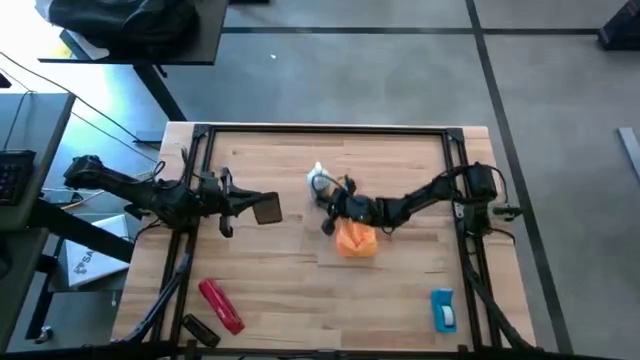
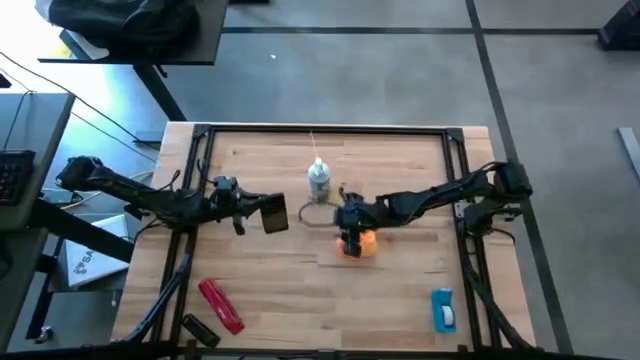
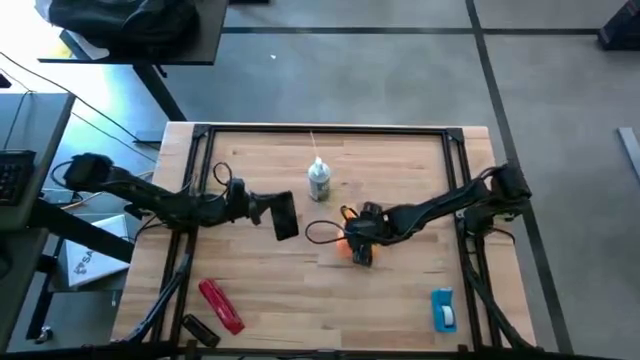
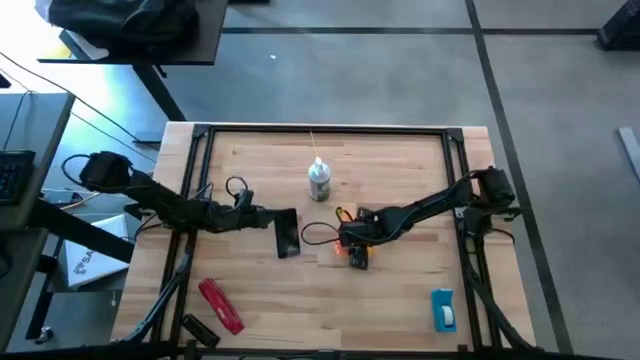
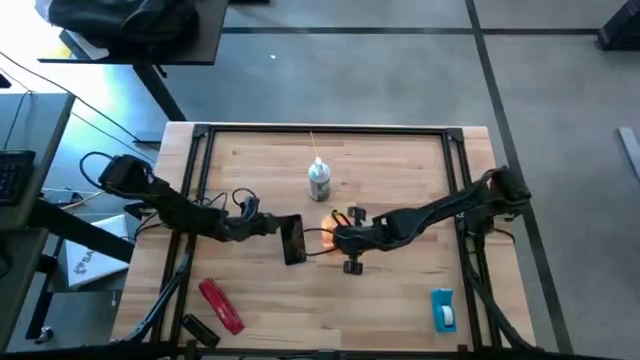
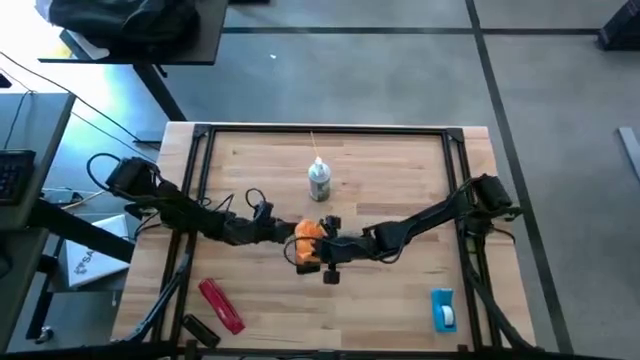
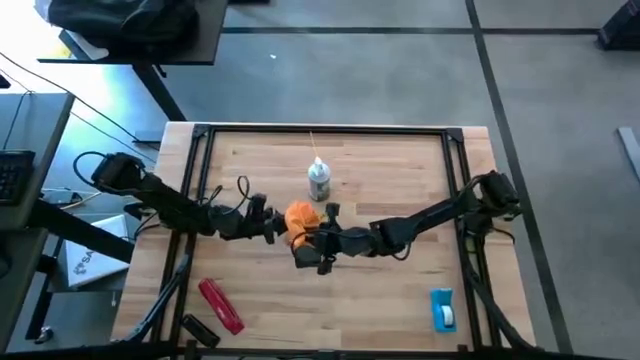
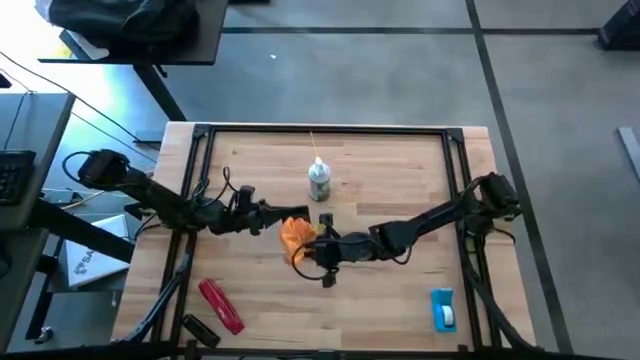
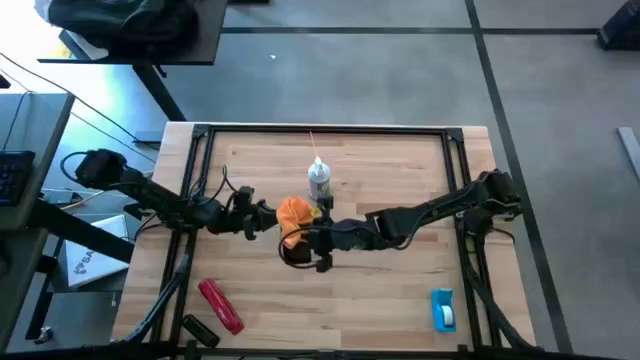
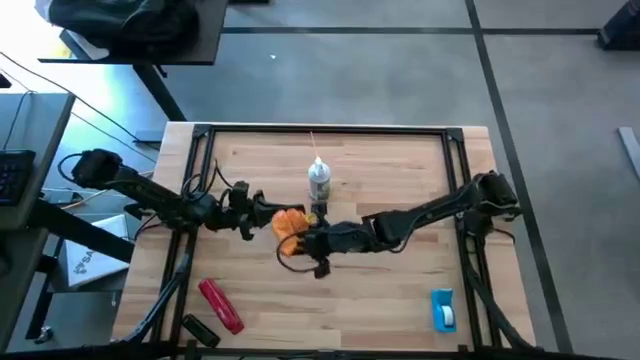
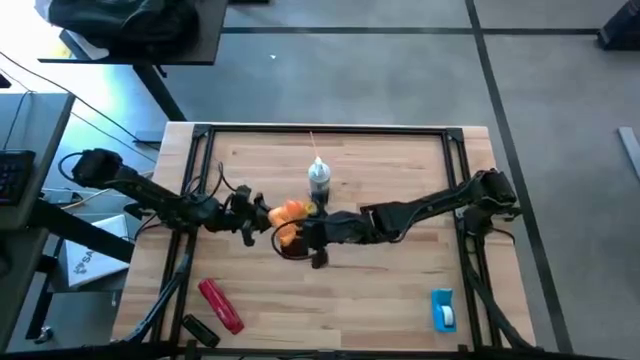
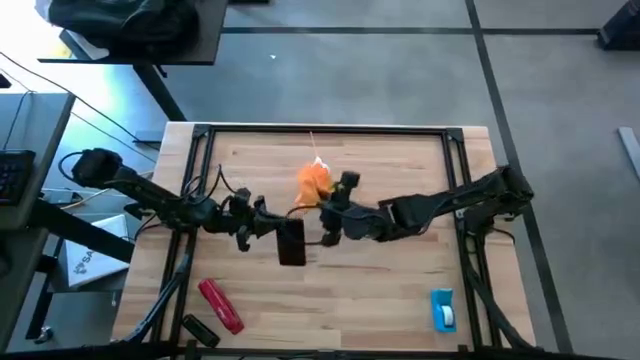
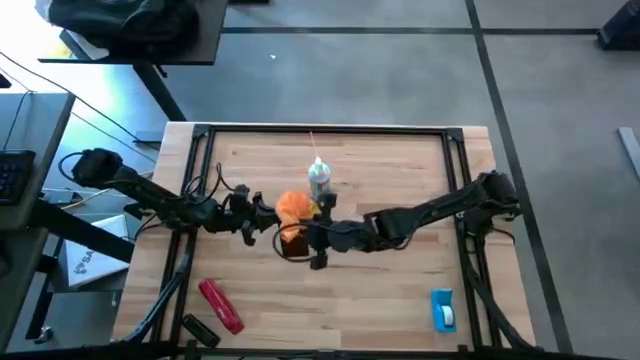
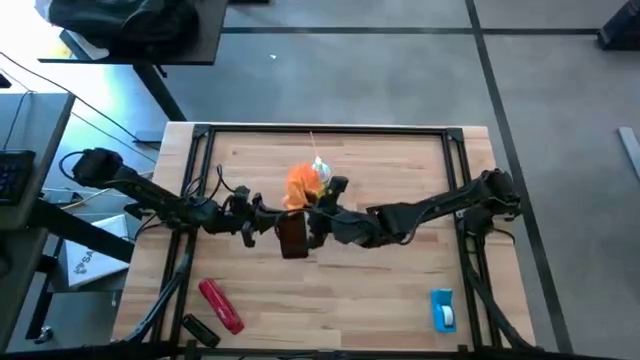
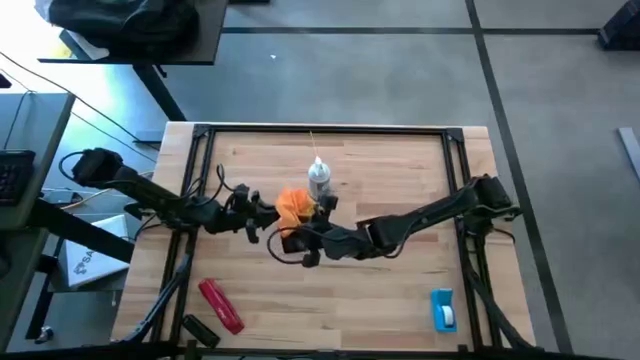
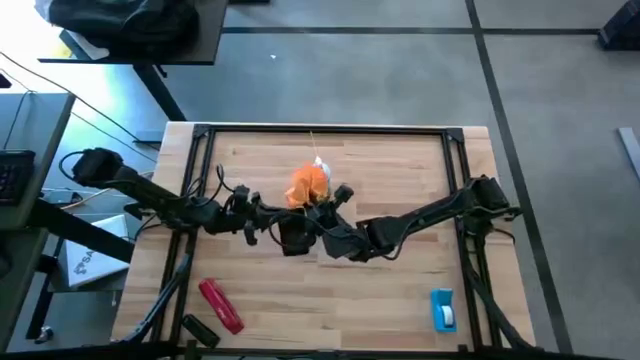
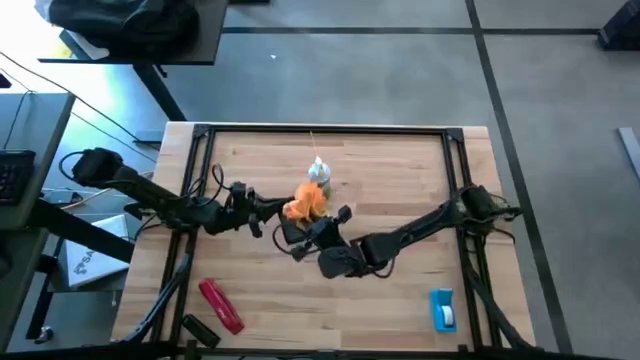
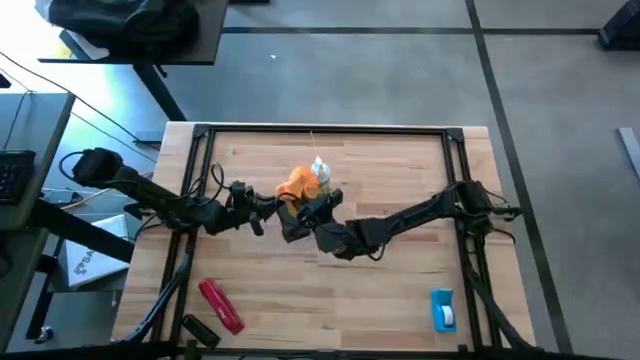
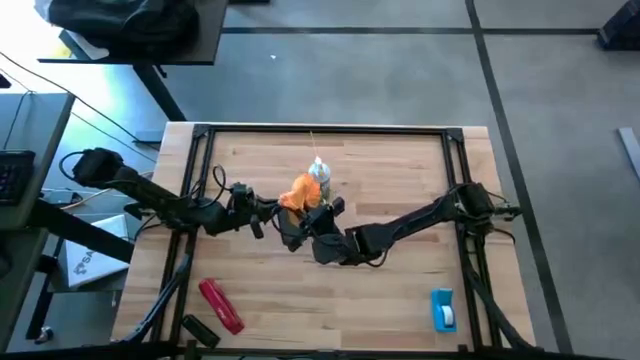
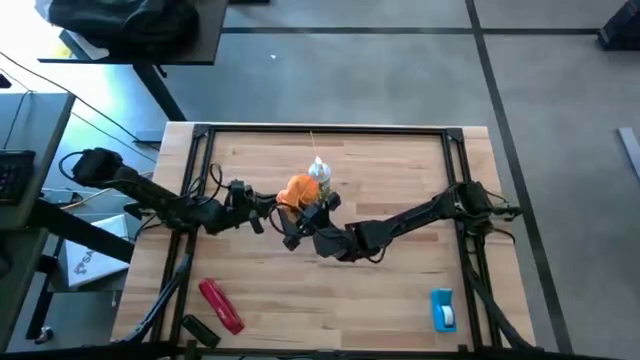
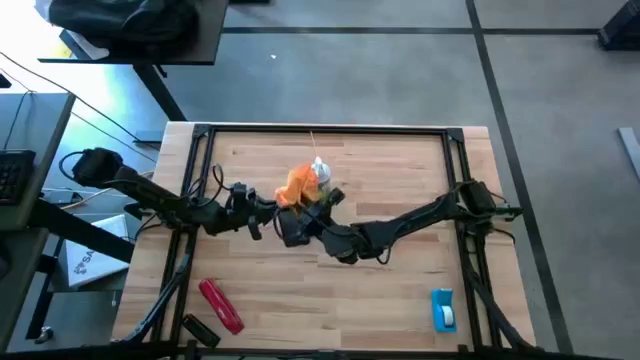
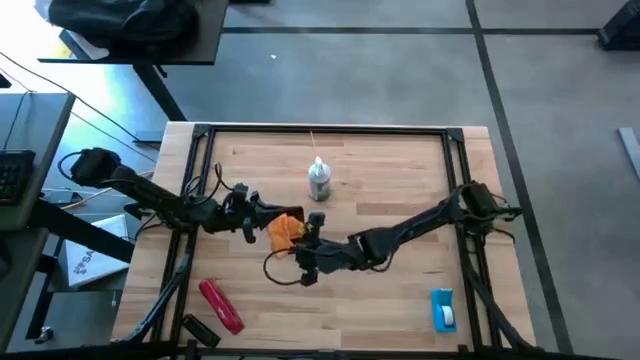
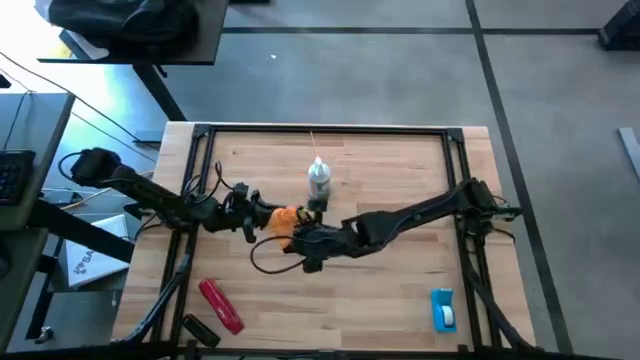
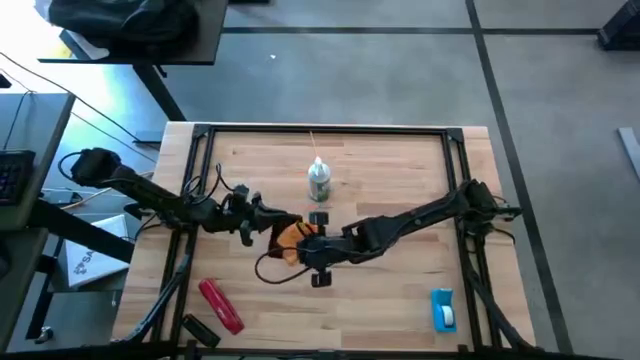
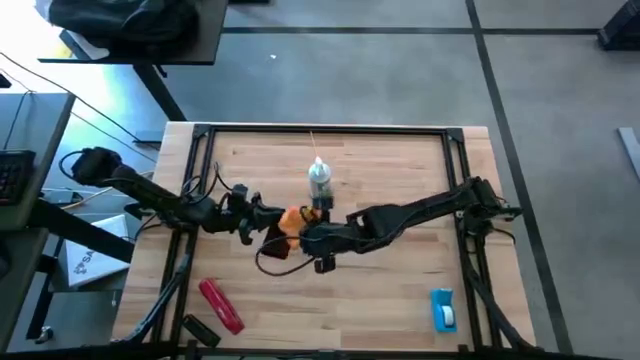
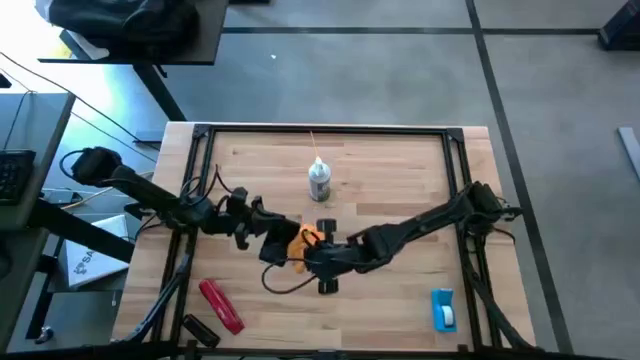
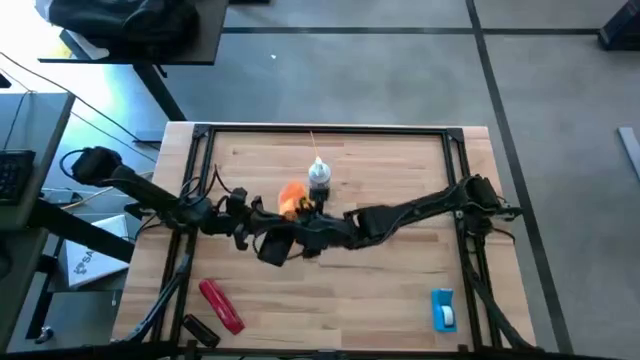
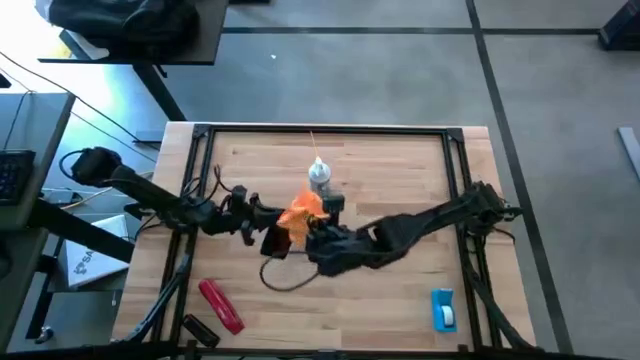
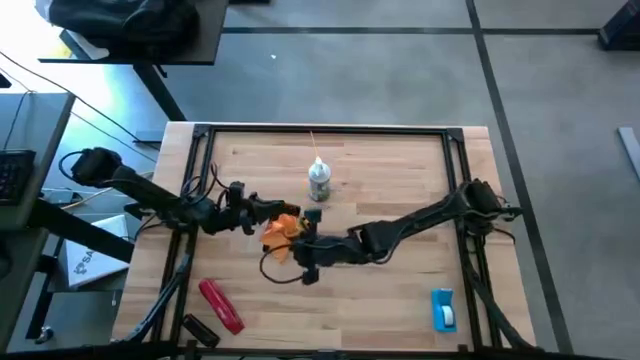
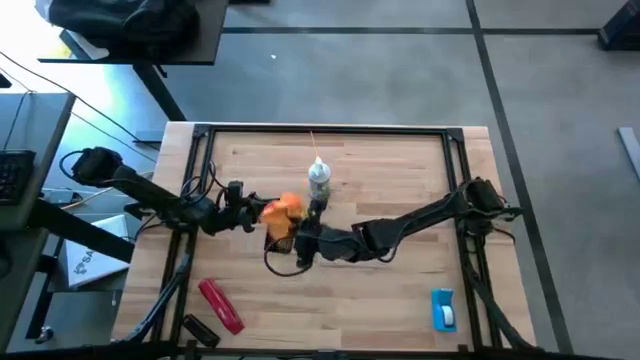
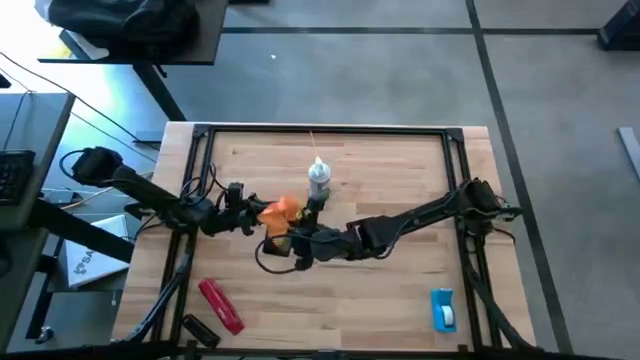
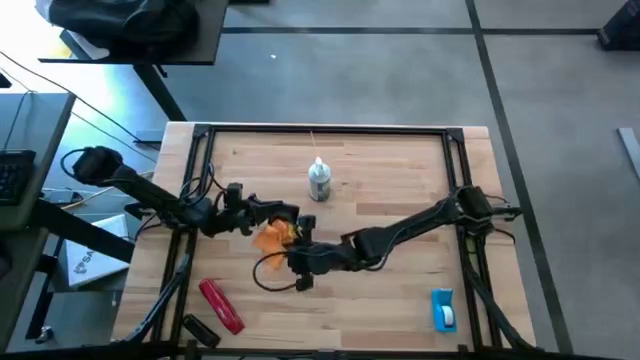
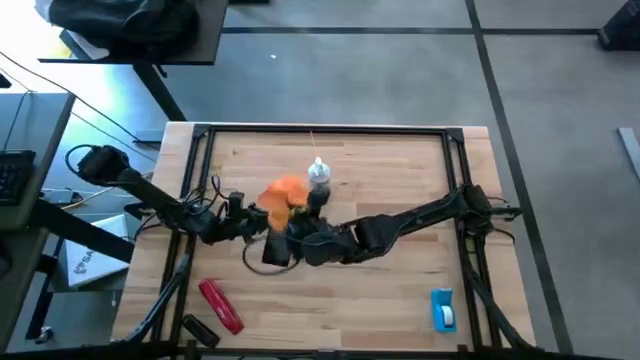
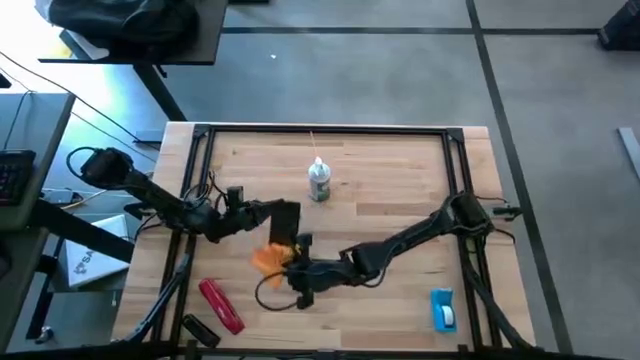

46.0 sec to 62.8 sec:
Task: Apply microfiber cloth
Wipe the front and back of the black cellphone using the orange microfiber cloth

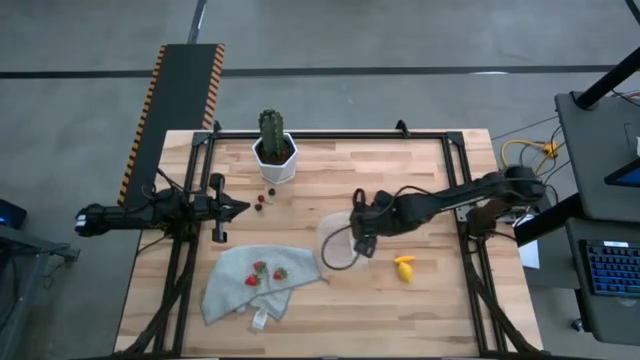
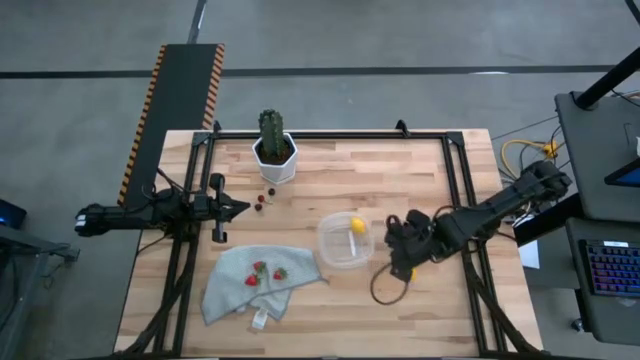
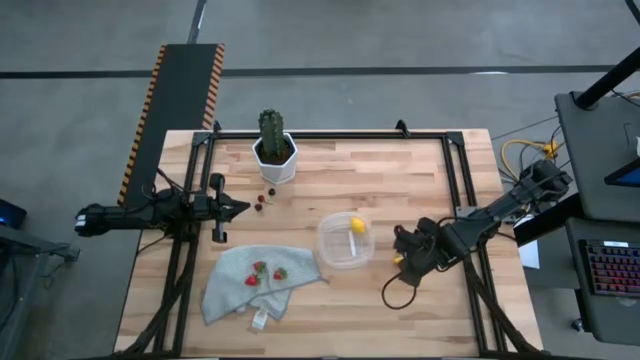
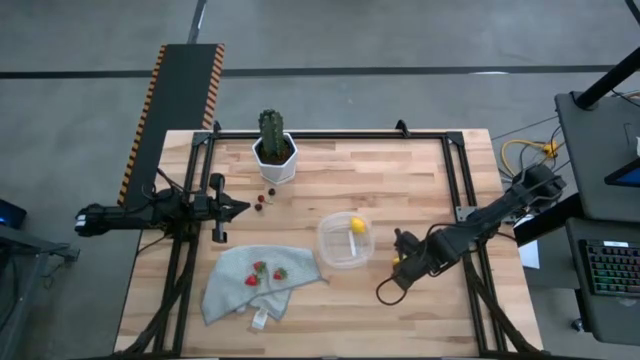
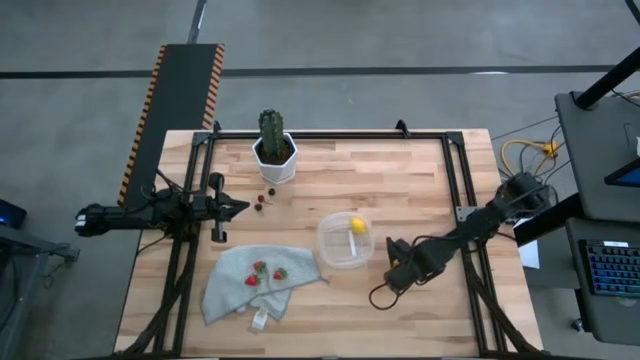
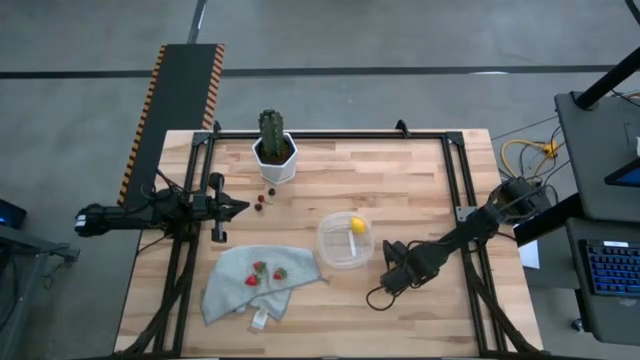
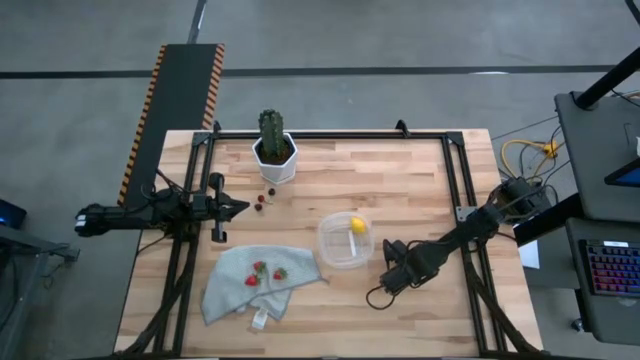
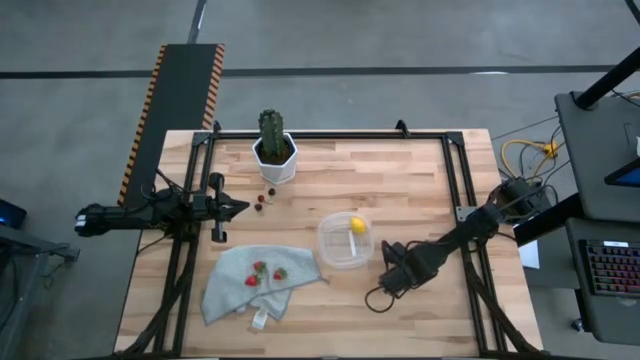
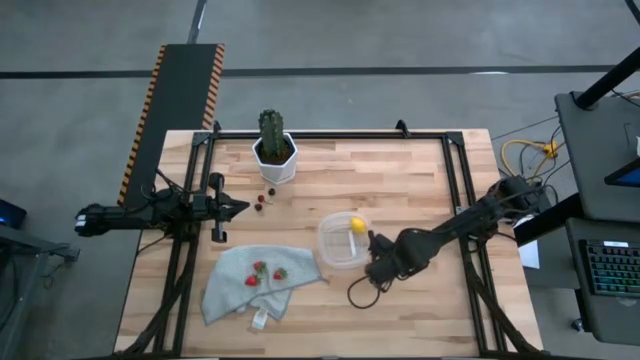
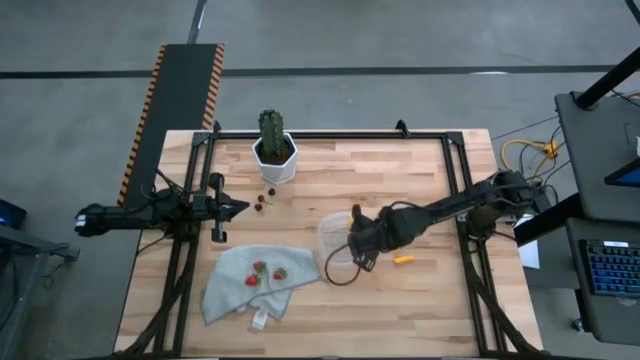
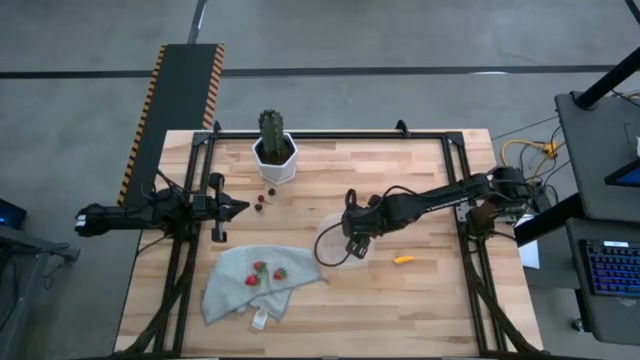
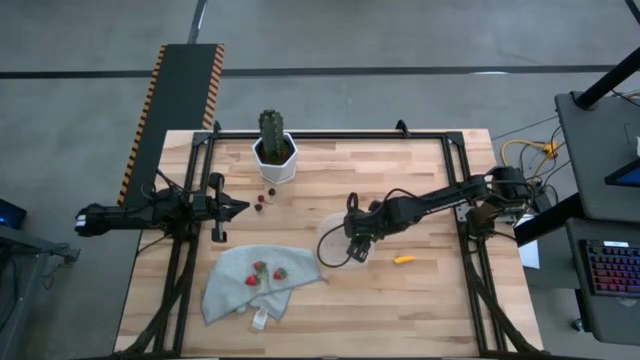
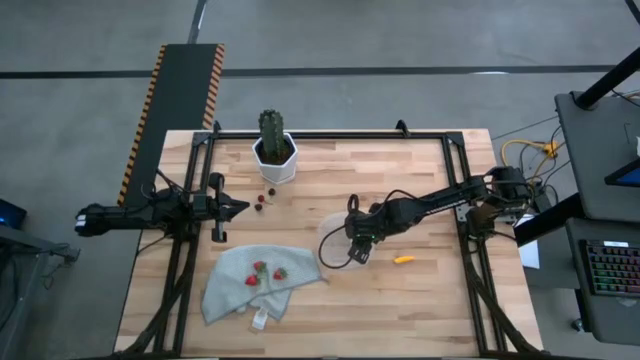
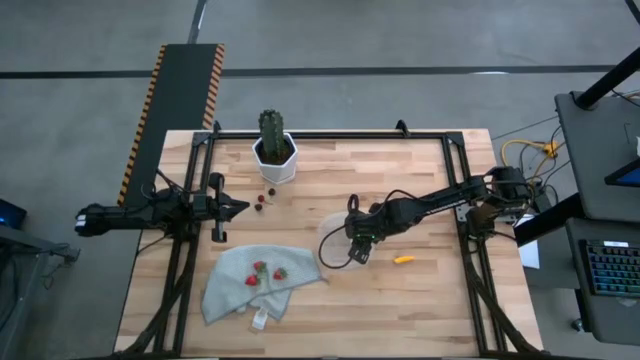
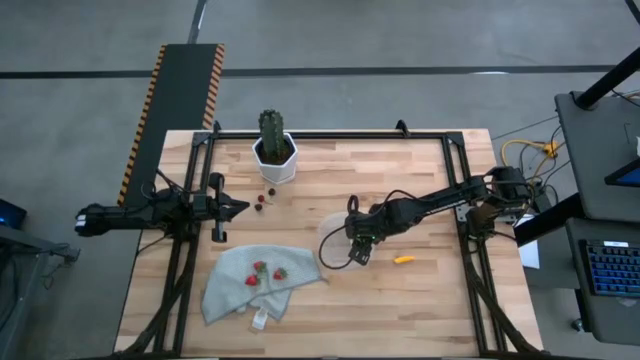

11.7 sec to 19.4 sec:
Task: Pick and placing Produce into tupperware
Put the yellow lemon into the transparent container
